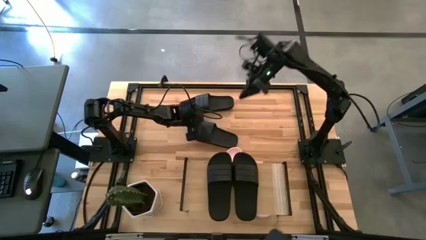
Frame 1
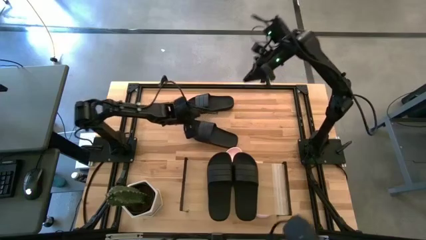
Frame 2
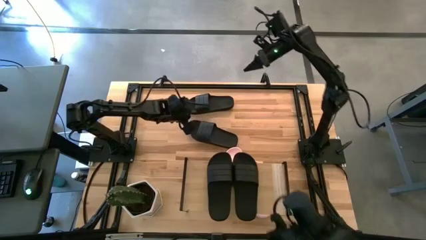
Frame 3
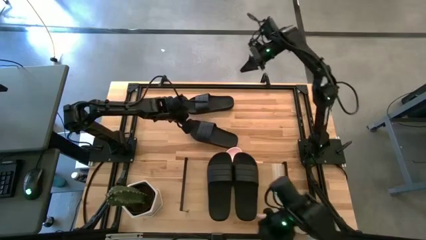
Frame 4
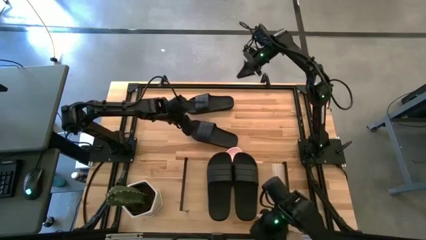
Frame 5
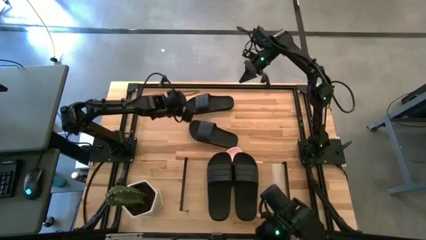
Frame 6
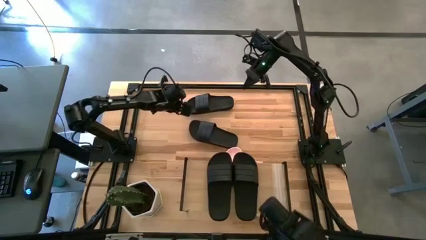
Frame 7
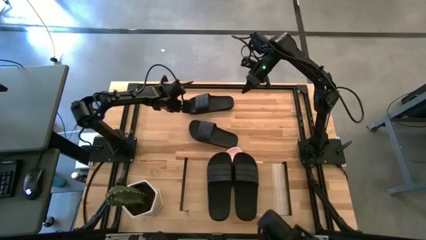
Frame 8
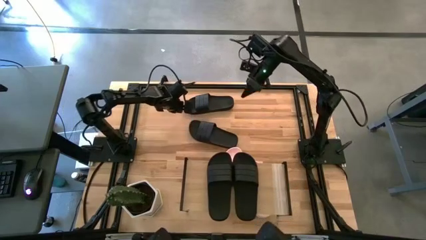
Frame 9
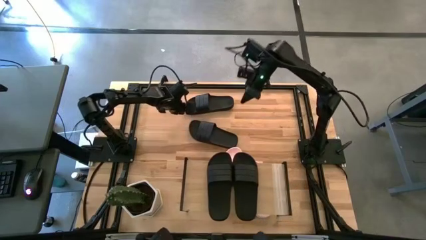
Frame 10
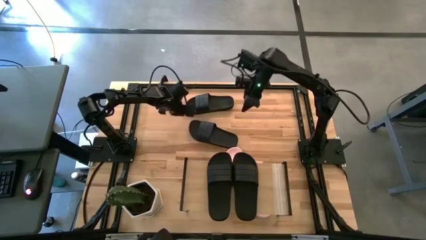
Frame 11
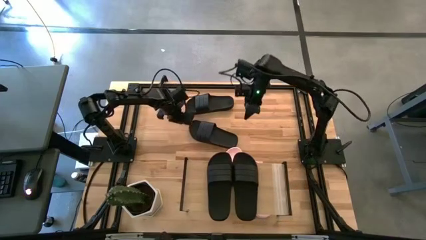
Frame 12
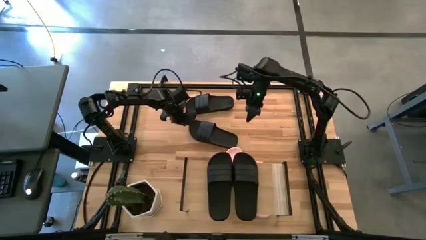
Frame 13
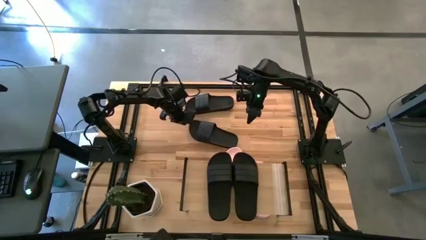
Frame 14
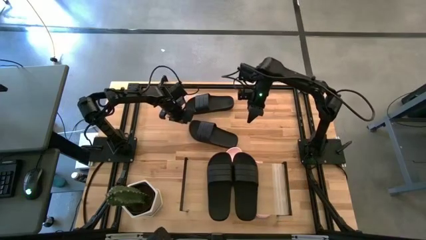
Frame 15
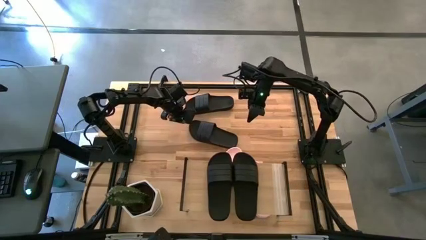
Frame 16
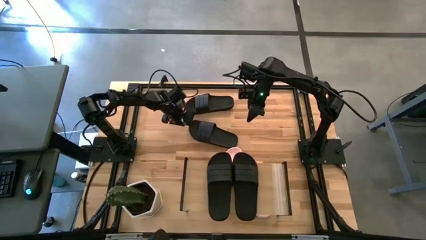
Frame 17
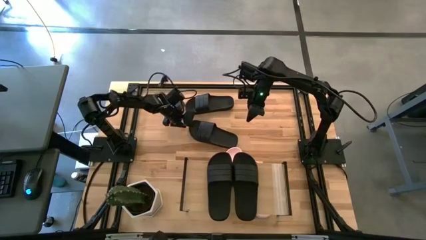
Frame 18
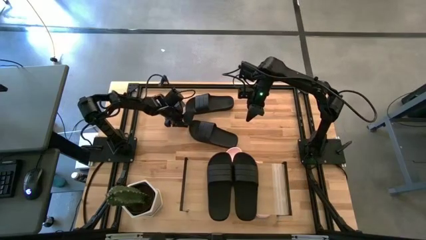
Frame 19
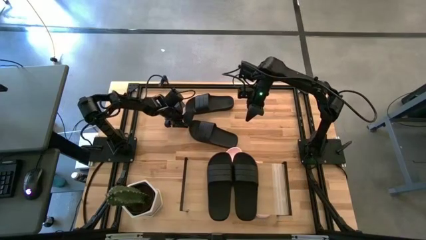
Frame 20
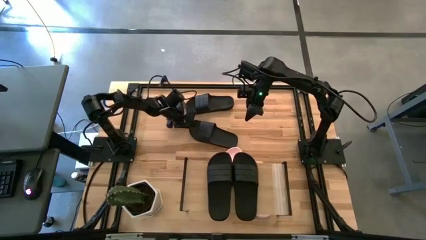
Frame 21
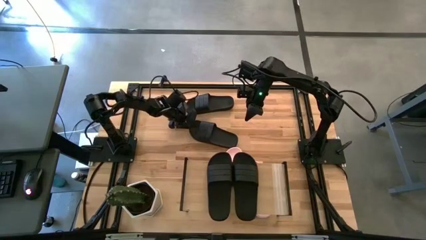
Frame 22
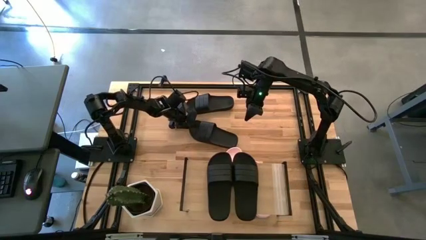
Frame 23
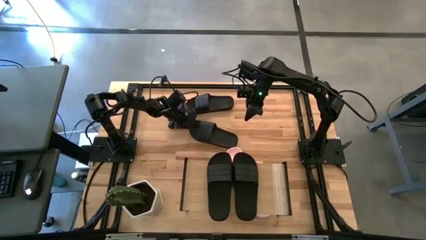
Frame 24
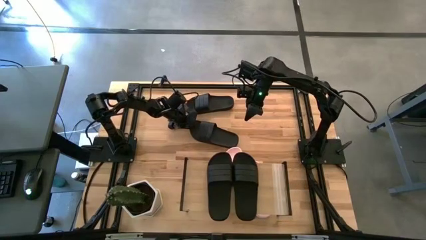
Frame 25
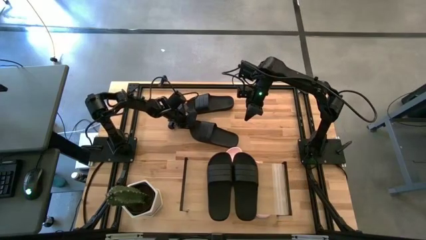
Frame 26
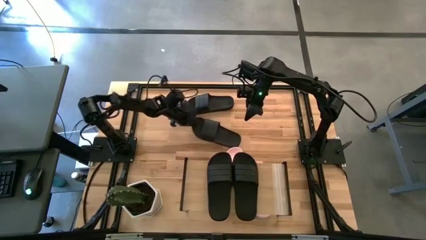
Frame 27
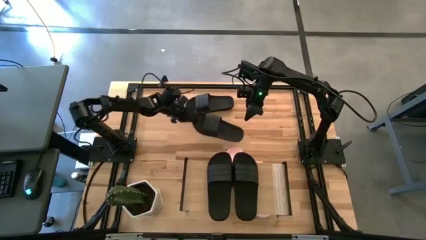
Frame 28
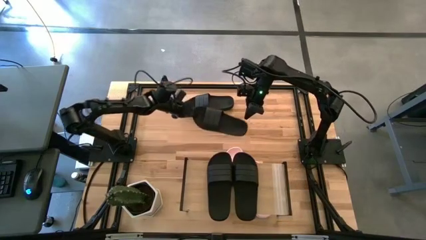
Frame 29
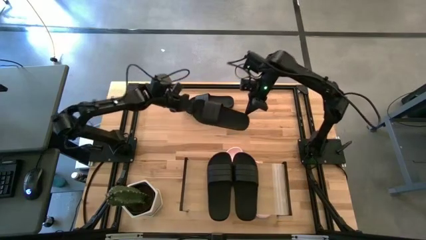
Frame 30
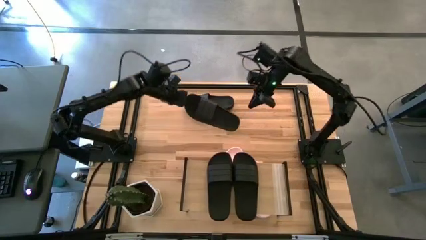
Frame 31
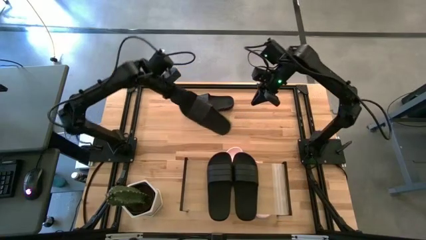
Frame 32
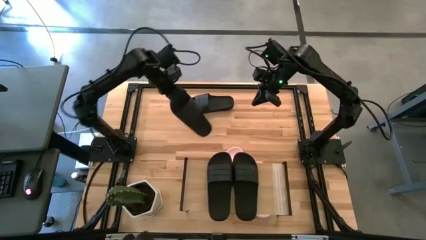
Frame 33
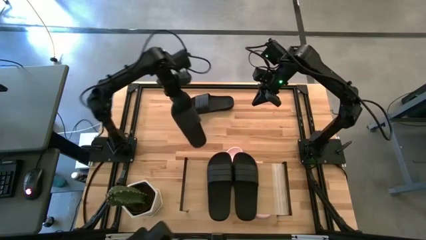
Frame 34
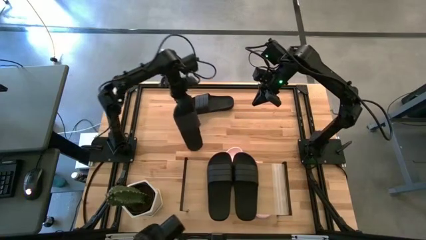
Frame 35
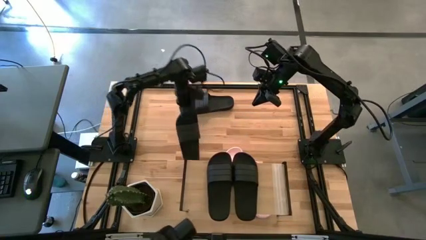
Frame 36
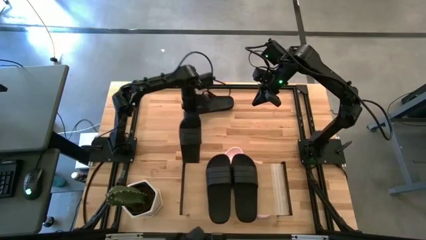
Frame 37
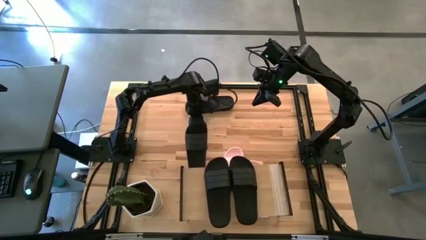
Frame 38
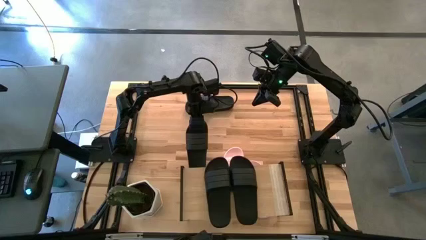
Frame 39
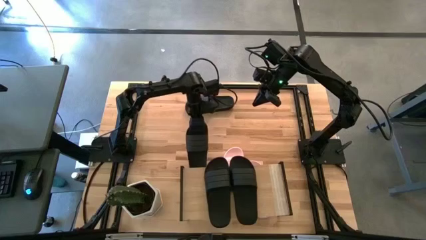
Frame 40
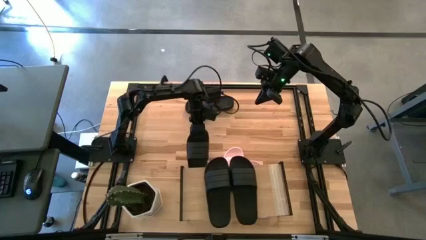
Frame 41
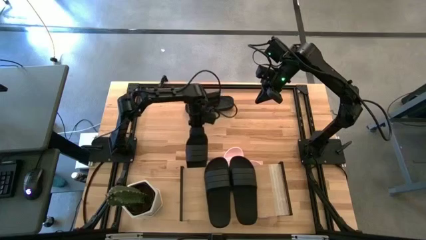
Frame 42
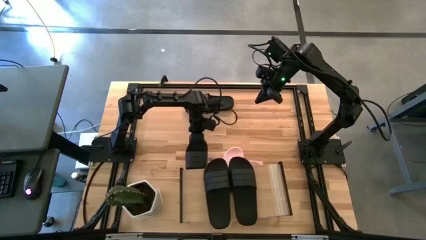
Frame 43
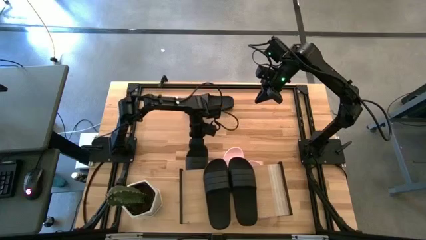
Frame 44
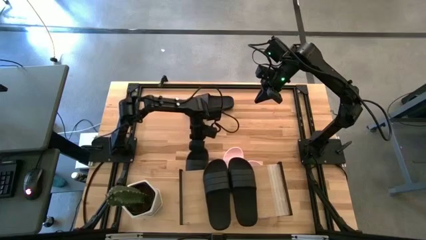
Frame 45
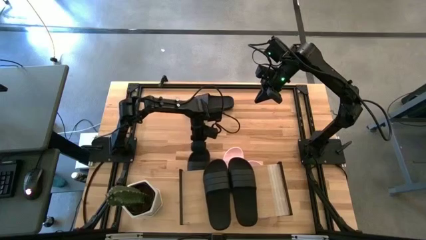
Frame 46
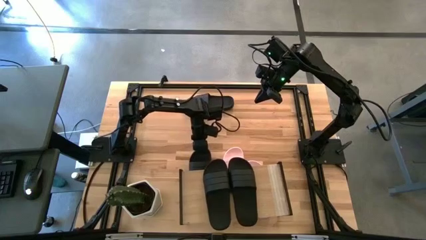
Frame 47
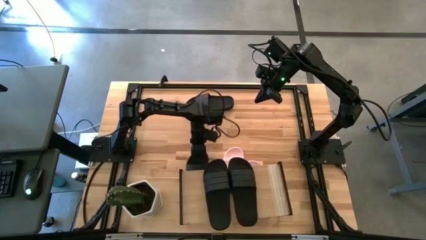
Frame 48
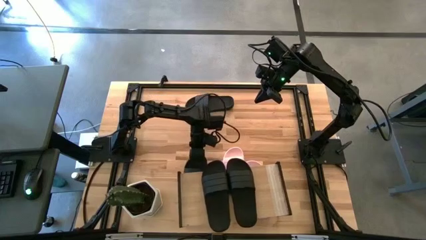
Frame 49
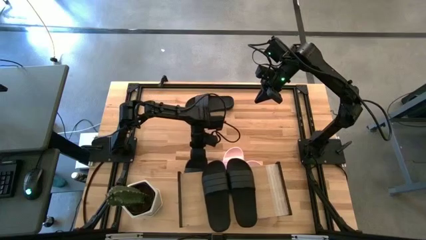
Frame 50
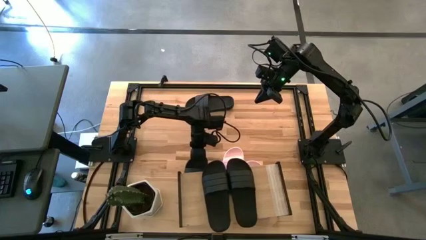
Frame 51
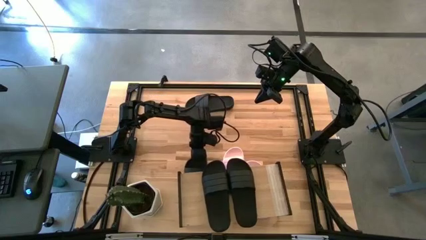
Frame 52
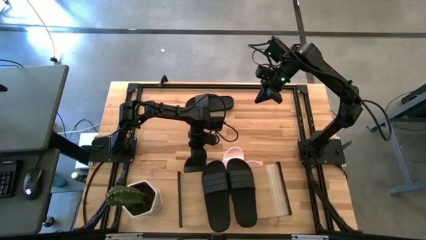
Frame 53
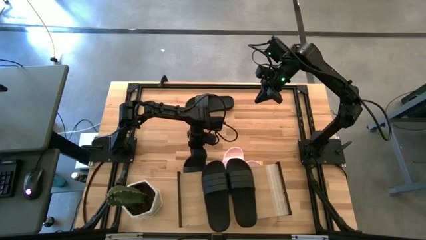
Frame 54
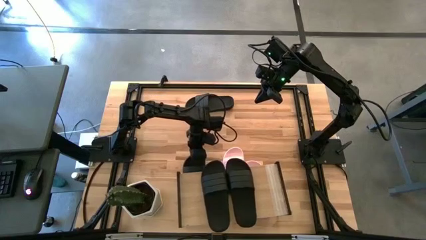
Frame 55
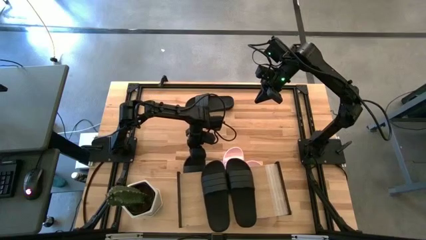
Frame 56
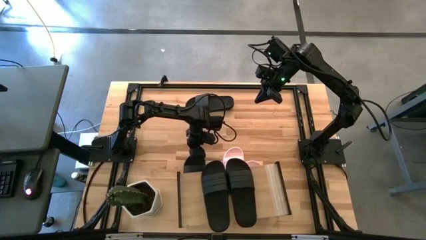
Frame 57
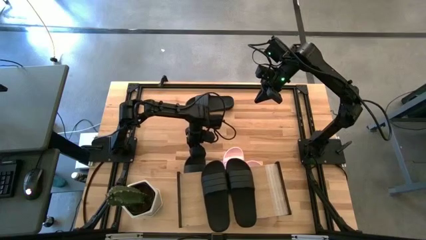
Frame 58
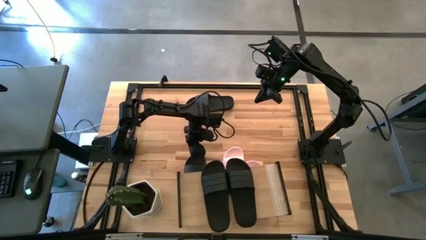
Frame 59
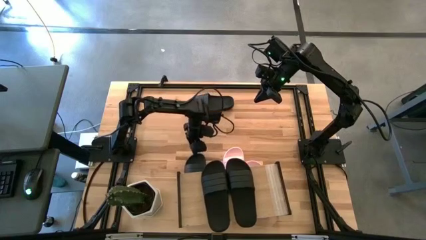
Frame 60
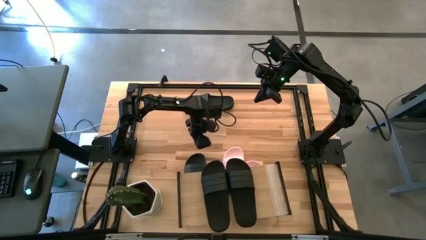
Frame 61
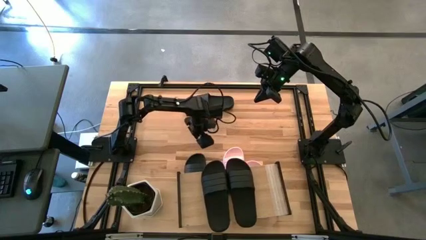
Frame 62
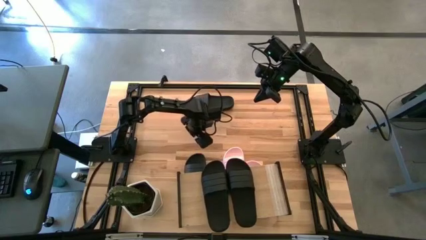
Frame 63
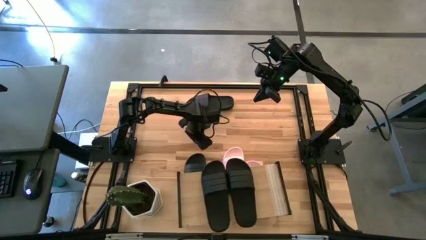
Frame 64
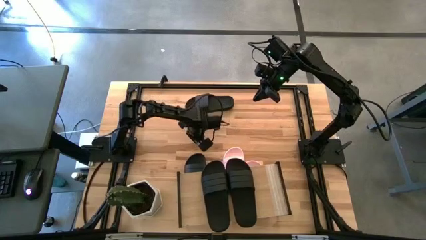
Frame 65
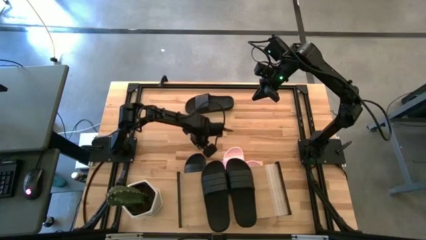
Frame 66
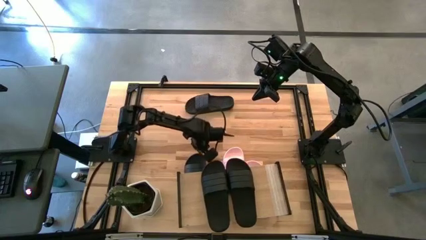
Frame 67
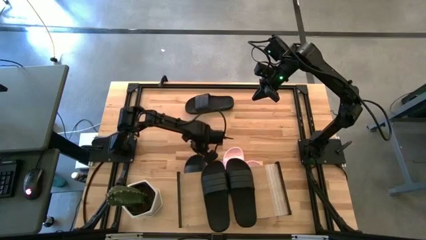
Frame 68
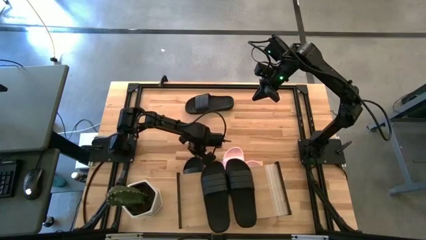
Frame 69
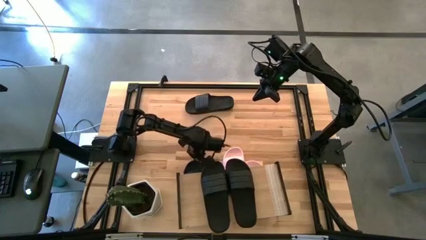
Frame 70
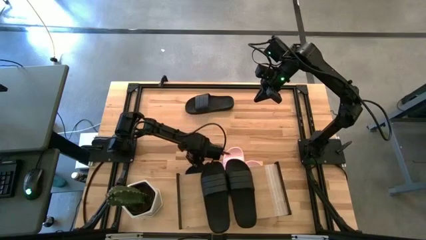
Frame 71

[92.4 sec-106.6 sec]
Task: Pick and place slides into the shelf
Put the black slipper under the shelf
